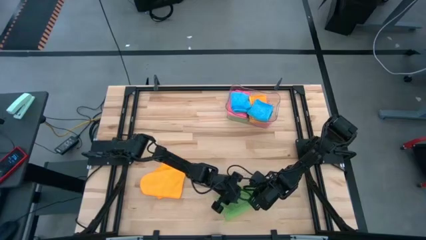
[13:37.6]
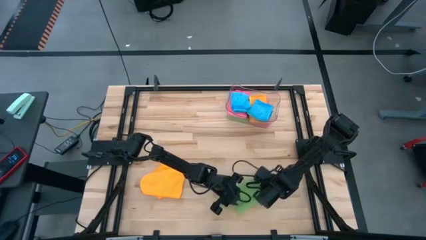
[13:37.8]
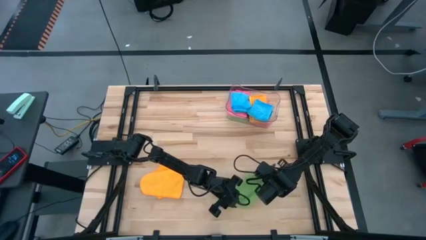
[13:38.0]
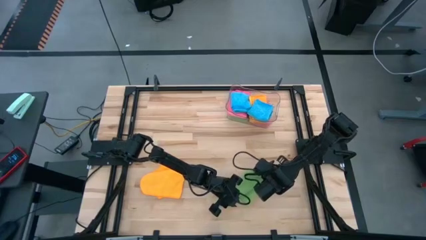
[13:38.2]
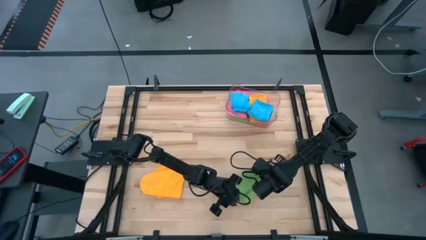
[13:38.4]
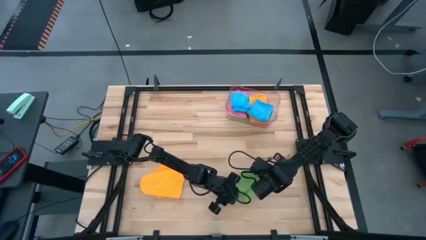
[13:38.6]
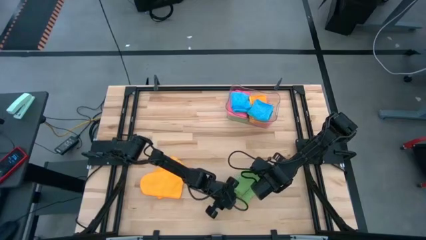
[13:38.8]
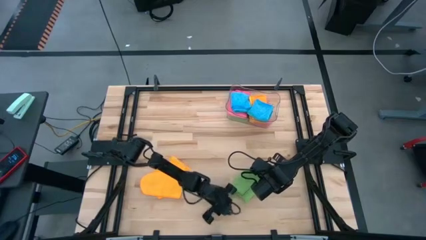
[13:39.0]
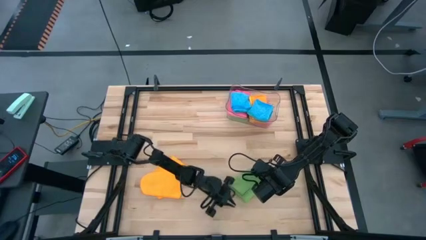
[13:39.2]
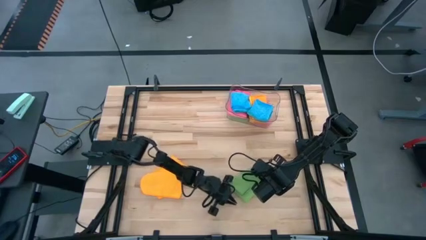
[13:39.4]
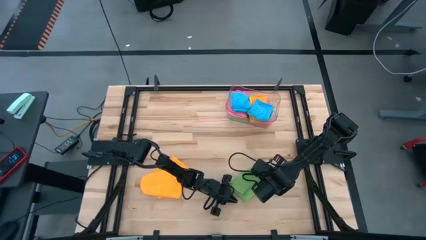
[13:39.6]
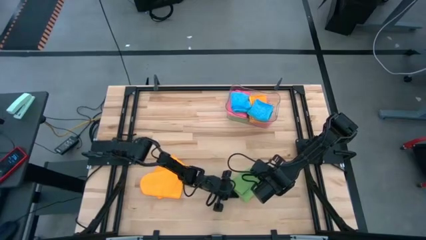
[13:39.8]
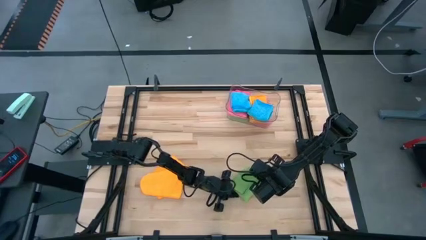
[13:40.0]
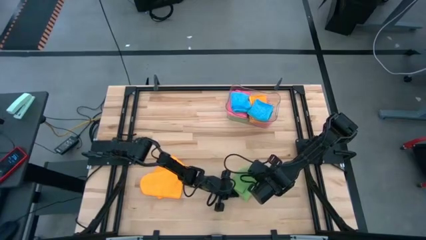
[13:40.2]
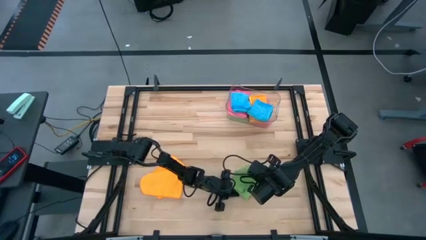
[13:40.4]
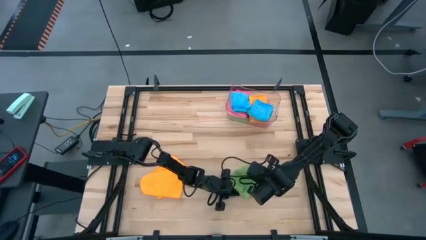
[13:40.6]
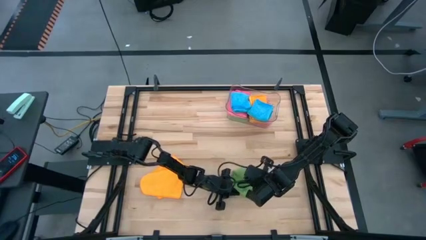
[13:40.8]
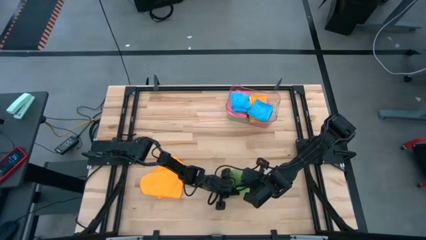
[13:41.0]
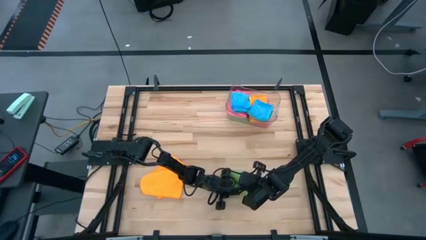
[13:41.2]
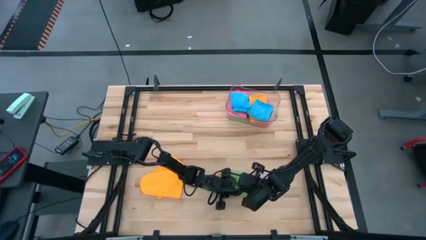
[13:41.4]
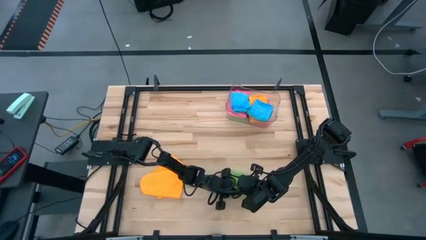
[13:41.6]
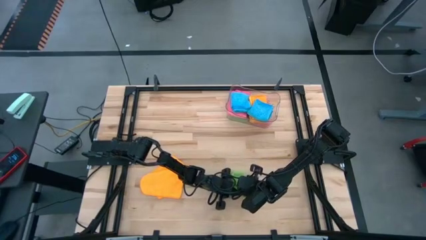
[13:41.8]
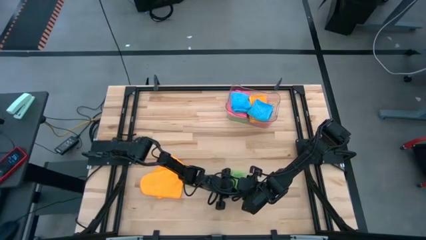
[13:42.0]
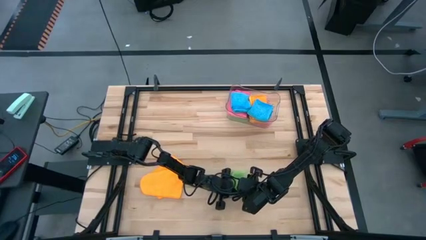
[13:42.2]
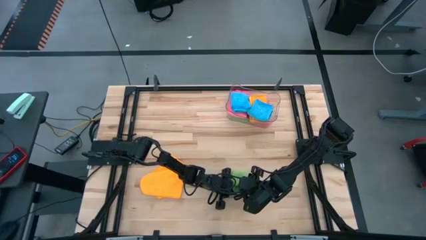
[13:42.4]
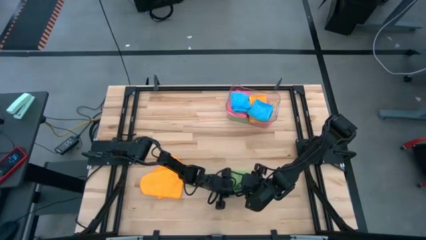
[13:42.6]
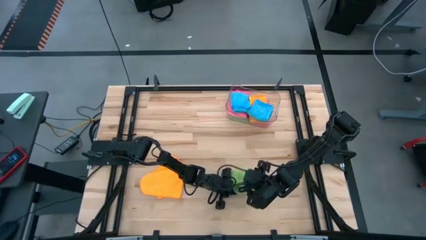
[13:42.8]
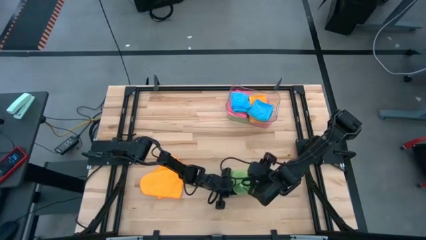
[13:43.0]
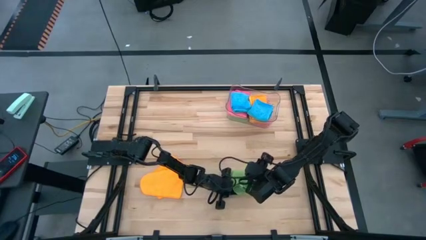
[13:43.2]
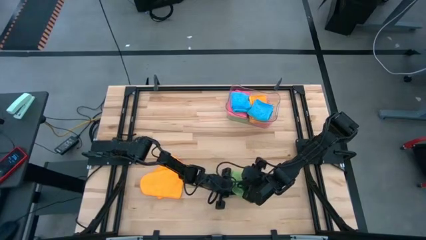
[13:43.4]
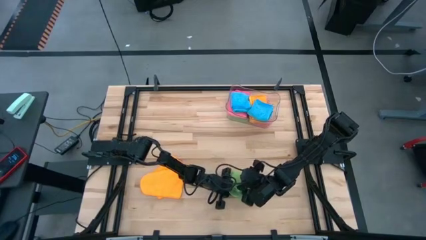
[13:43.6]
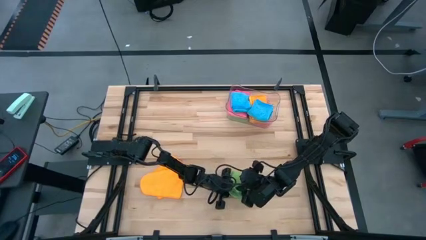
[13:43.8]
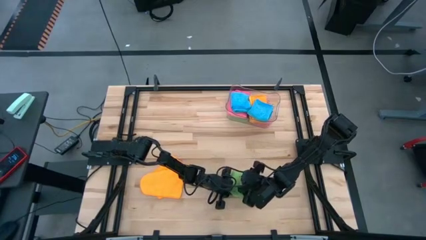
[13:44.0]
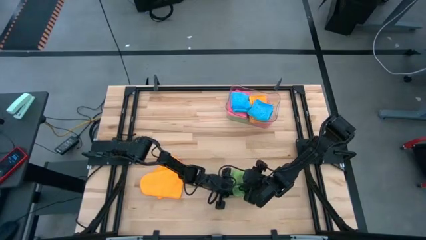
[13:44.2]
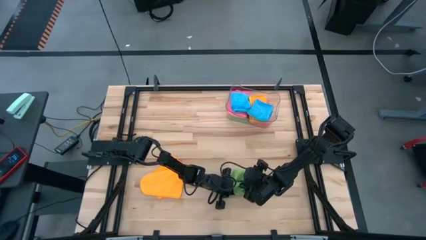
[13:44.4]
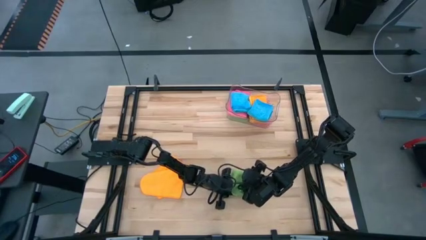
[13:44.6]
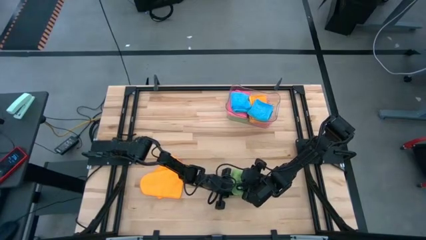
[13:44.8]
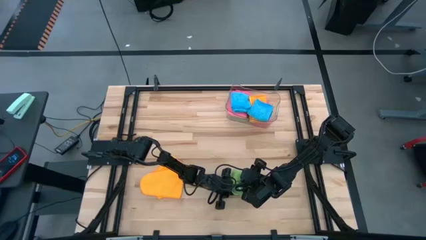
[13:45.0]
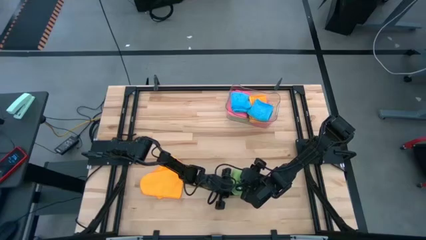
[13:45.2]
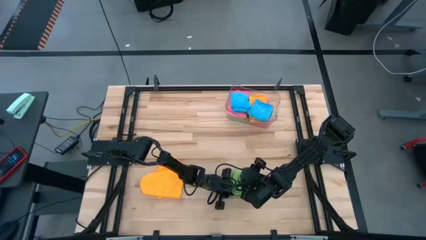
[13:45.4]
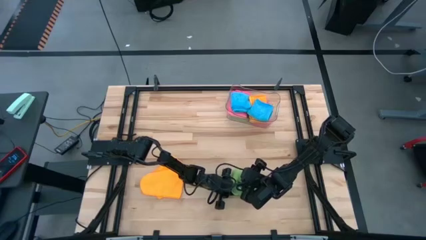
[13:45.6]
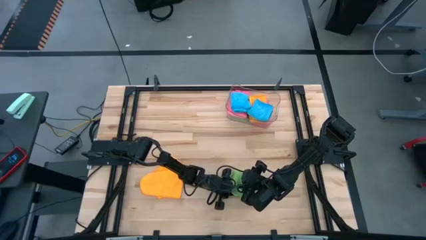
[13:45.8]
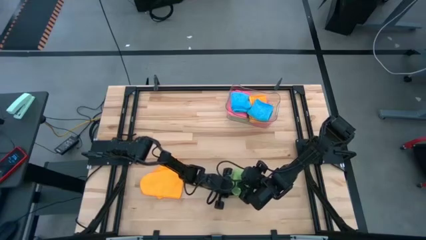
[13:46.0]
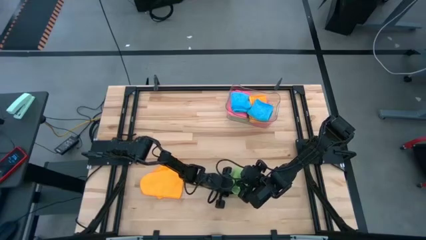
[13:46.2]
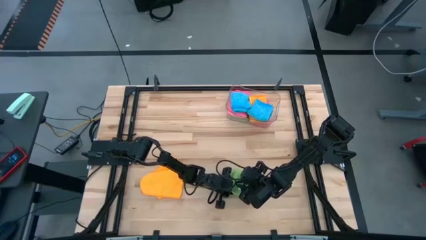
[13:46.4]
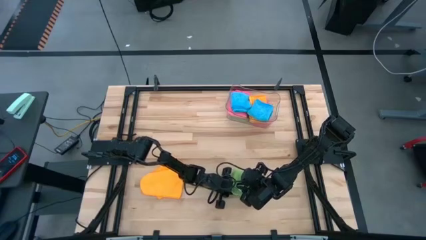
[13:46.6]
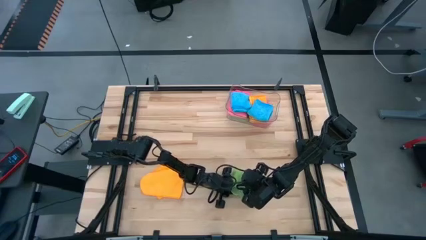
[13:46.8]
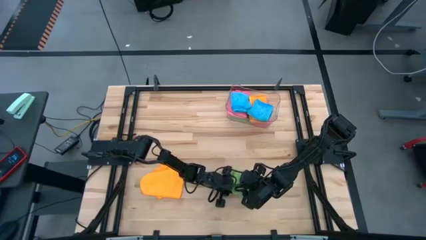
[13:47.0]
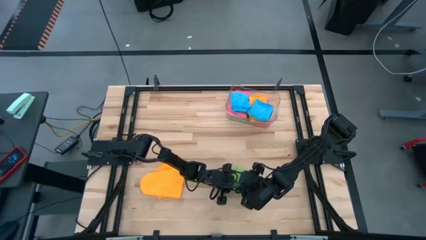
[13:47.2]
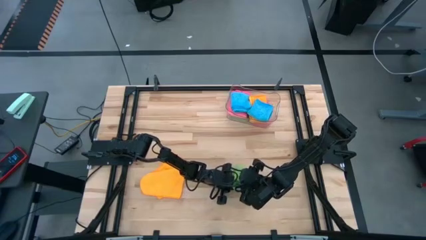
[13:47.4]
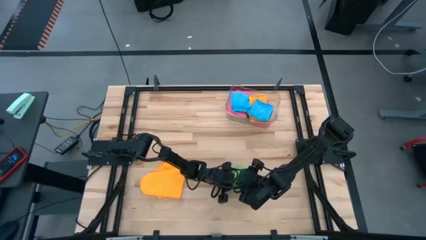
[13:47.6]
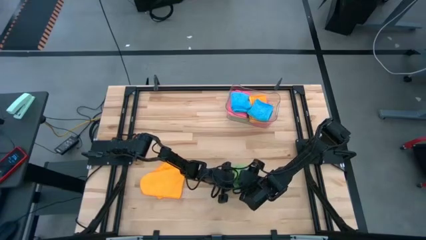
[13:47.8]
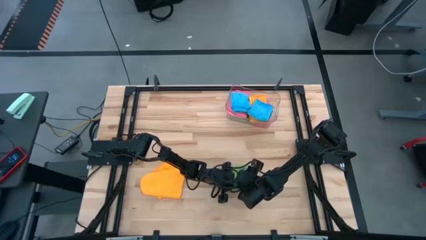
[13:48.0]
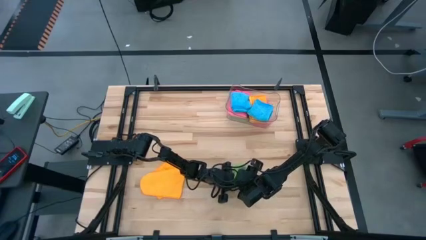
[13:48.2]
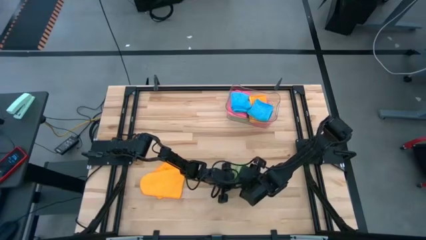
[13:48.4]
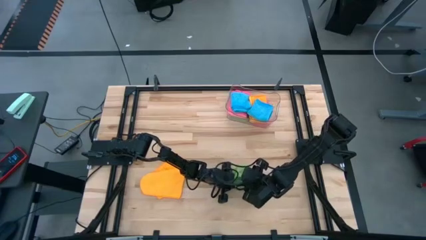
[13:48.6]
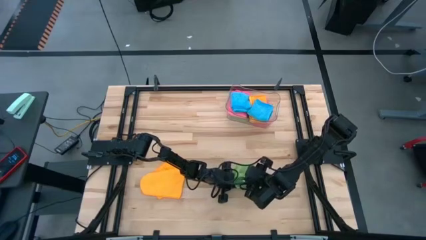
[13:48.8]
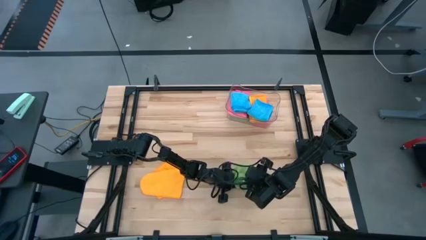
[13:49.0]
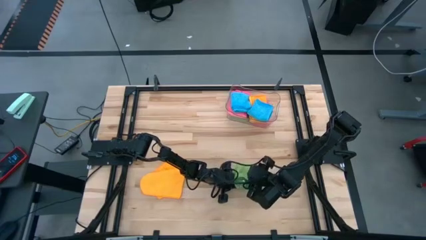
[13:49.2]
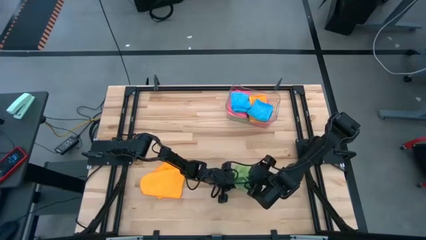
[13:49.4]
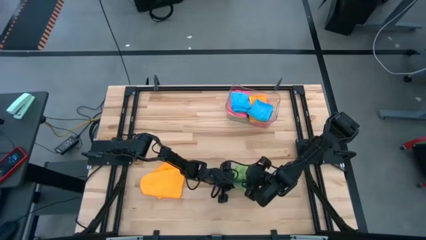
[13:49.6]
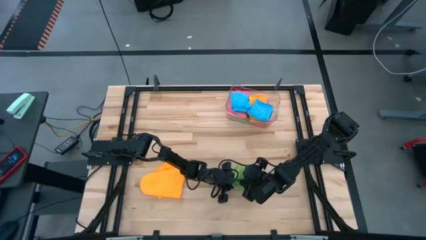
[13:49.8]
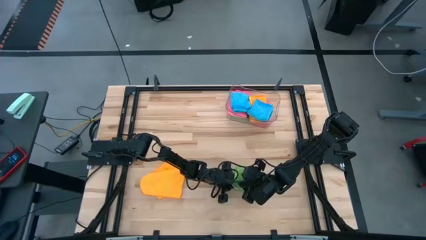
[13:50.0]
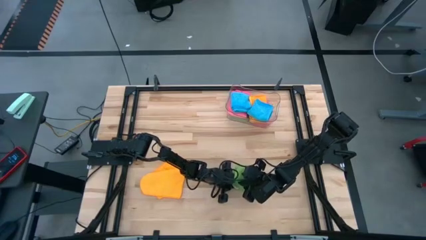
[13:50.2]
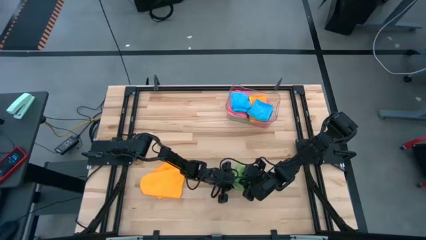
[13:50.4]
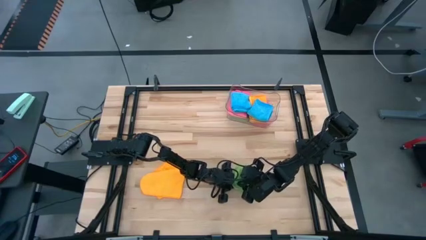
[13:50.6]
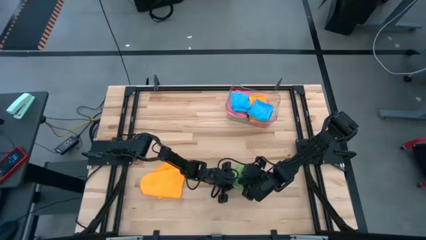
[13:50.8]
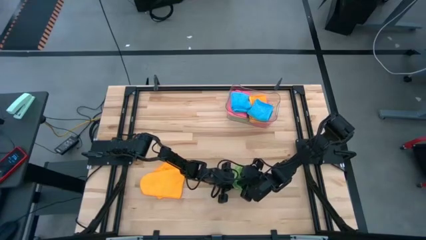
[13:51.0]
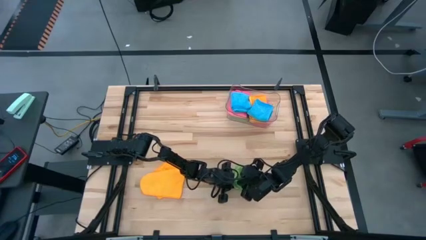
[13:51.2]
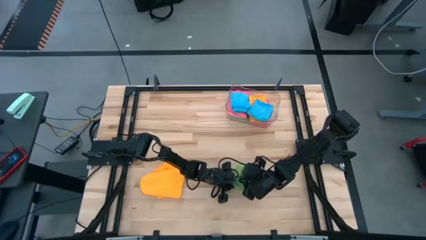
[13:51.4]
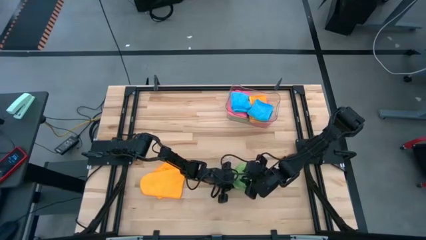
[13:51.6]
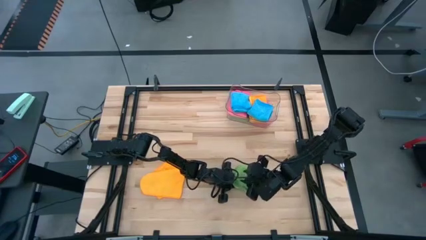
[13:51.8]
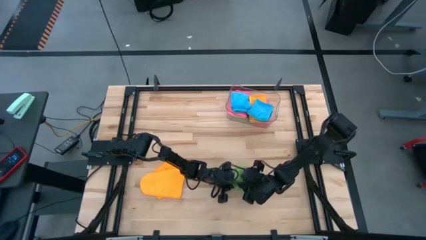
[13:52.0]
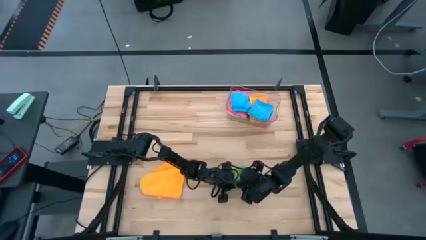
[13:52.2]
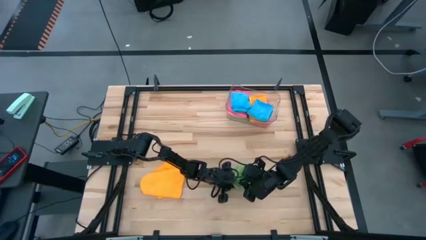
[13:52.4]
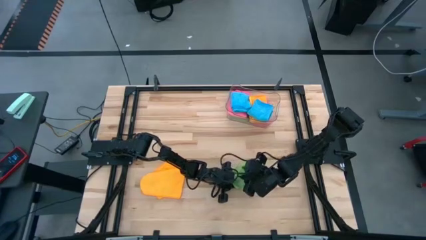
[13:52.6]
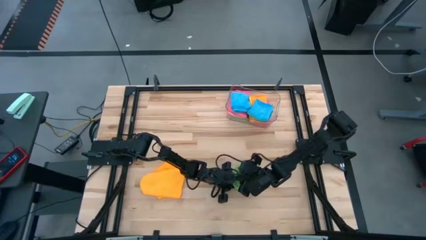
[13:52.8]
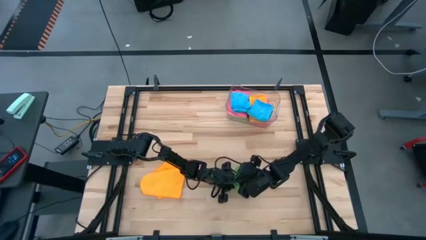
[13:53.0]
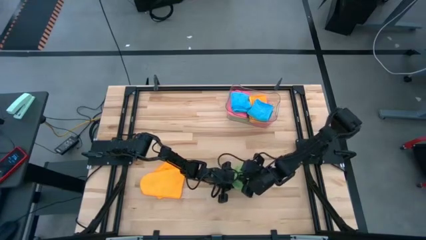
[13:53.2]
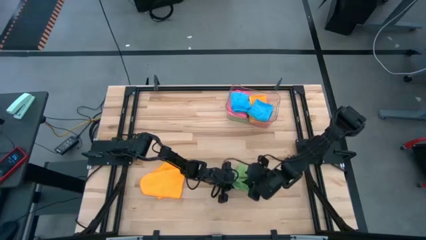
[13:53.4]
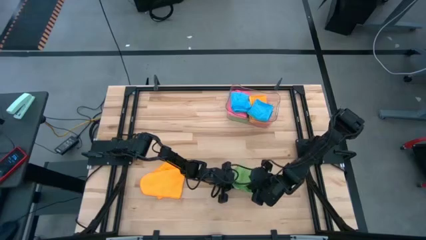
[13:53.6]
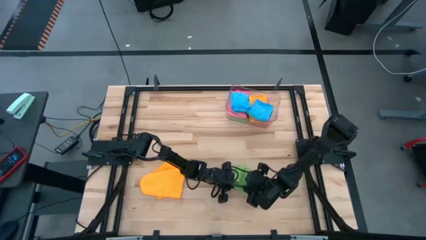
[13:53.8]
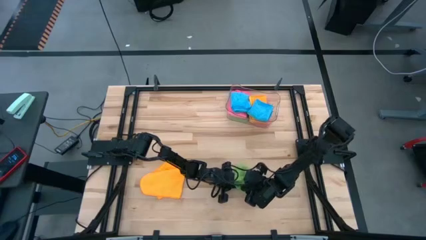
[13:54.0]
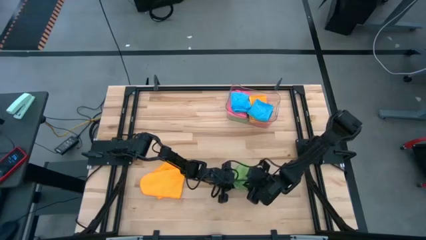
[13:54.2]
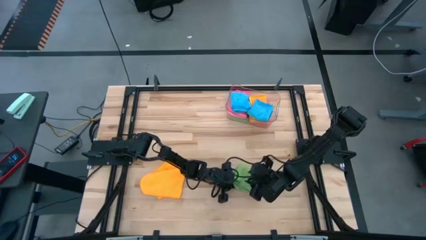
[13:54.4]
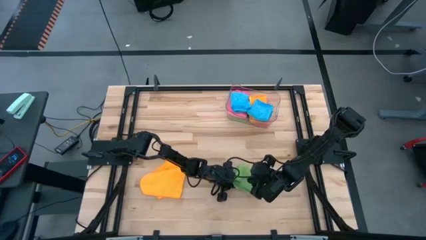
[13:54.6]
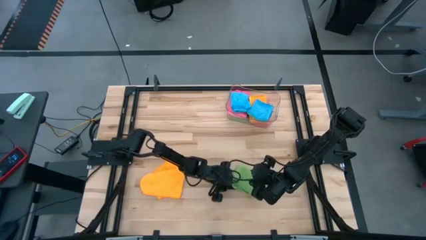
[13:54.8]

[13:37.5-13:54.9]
Task: Fold microfiber towels
Fold the green towel
